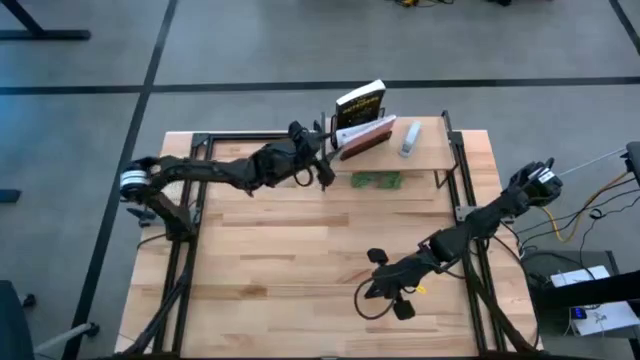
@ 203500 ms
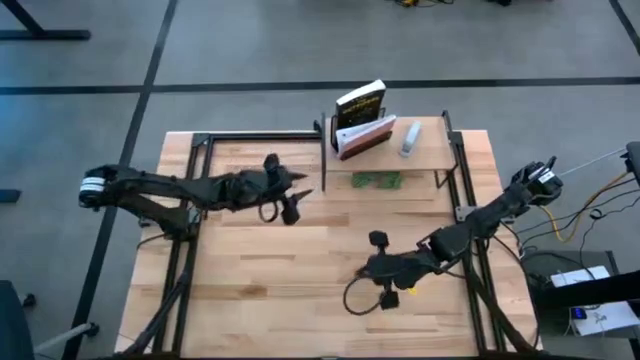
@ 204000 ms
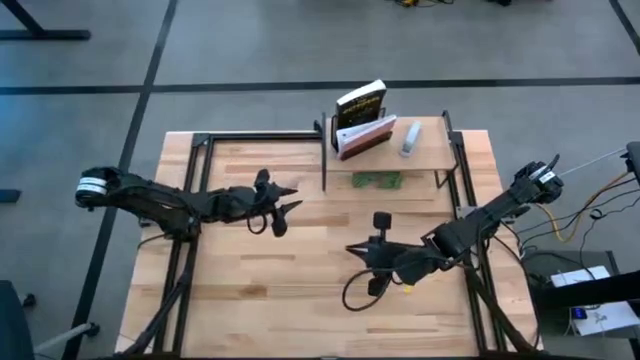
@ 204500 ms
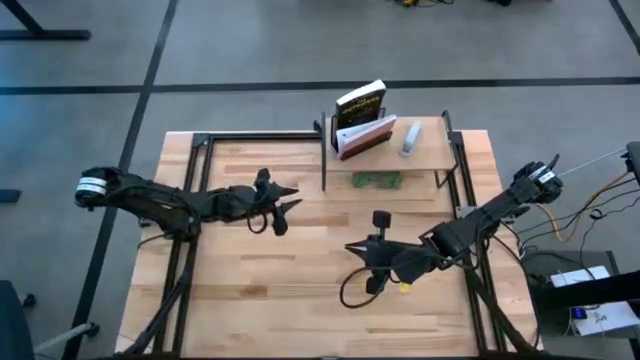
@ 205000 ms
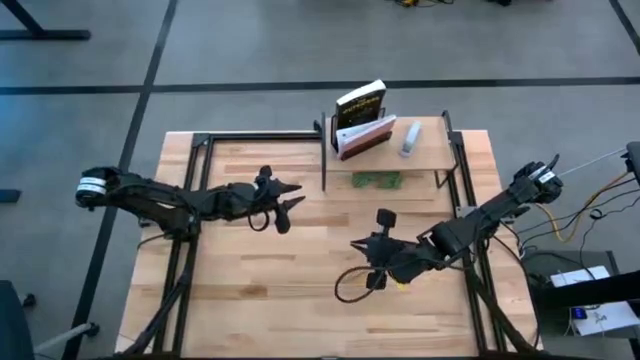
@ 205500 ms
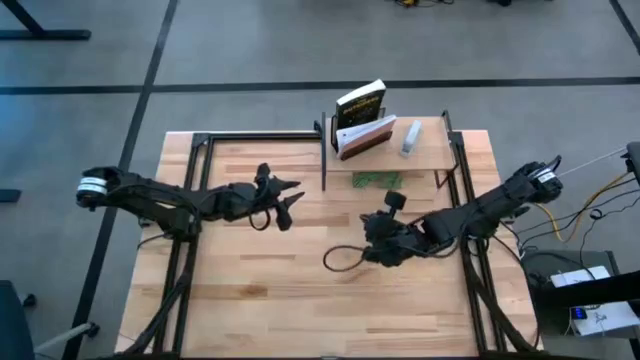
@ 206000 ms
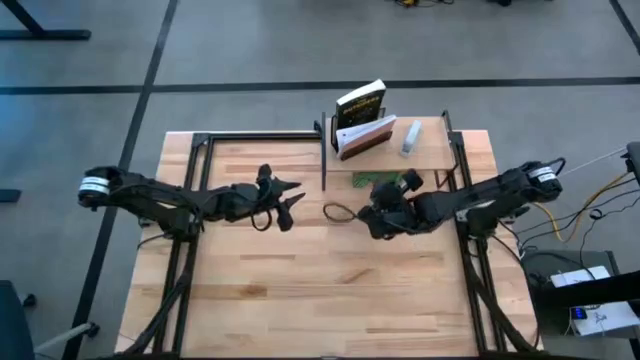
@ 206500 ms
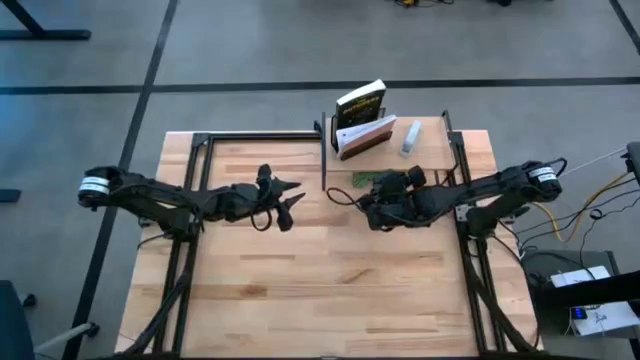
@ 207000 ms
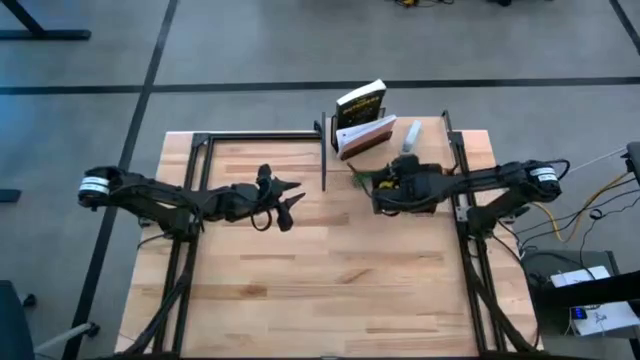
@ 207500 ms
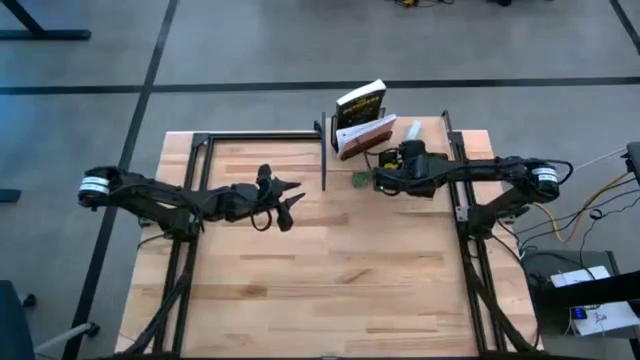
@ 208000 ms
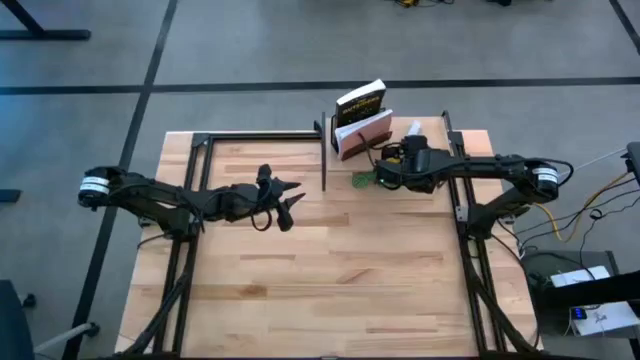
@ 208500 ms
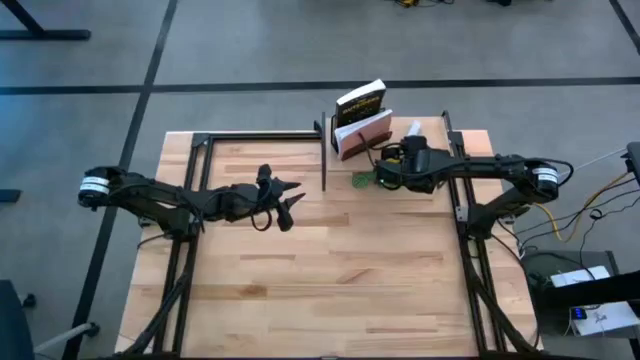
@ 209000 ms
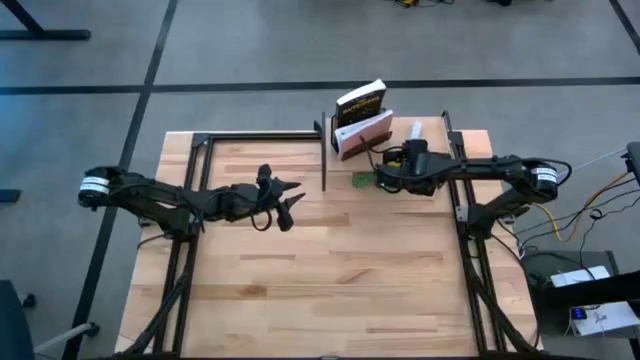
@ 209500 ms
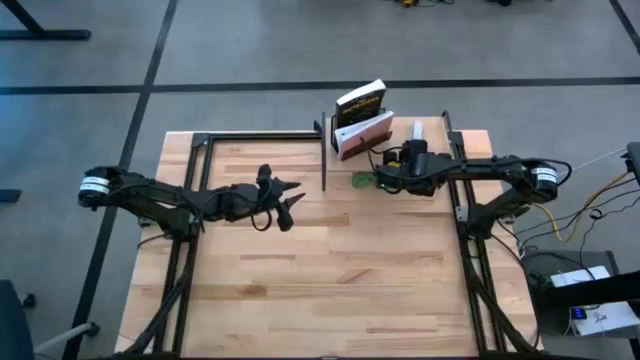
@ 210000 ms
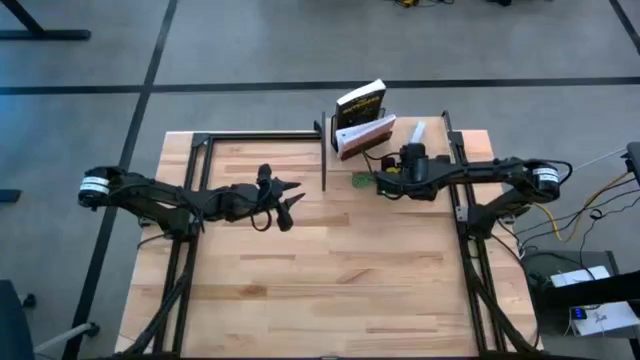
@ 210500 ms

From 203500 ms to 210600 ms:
Task: Stock shelves
Remove the gray stapler from the shelf

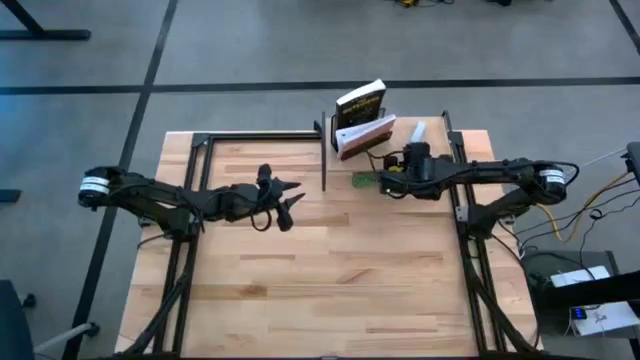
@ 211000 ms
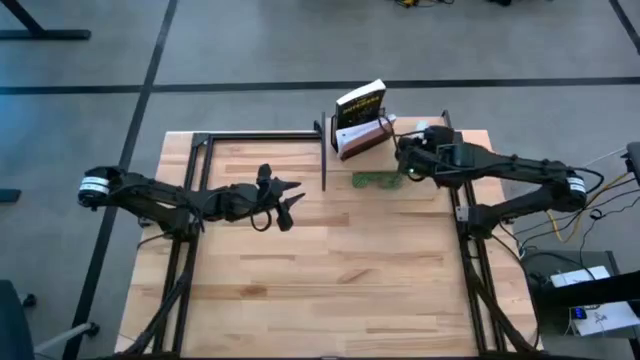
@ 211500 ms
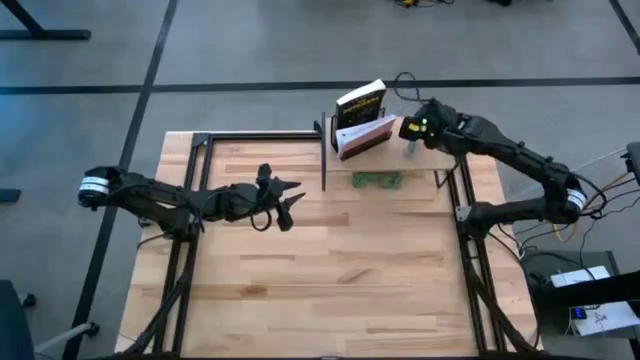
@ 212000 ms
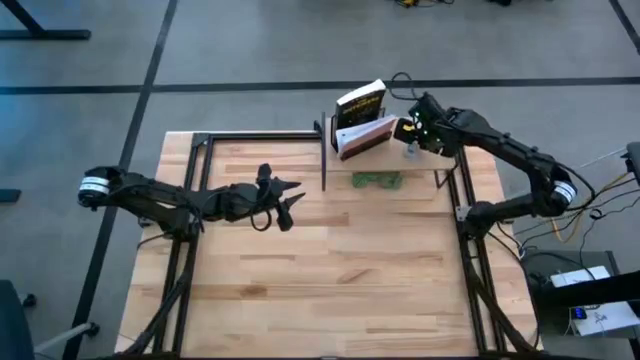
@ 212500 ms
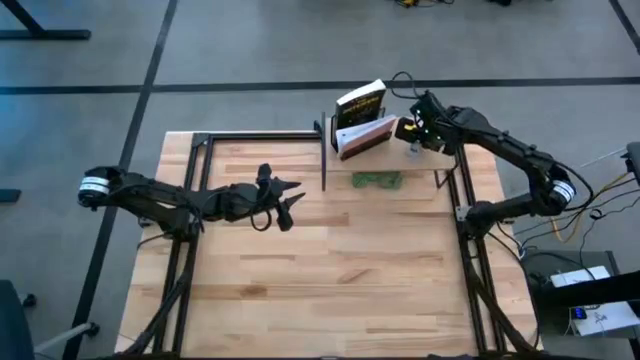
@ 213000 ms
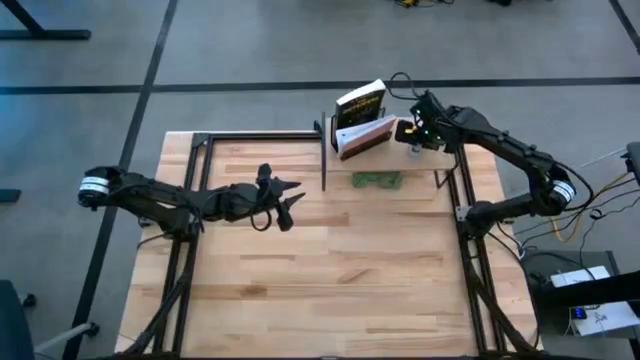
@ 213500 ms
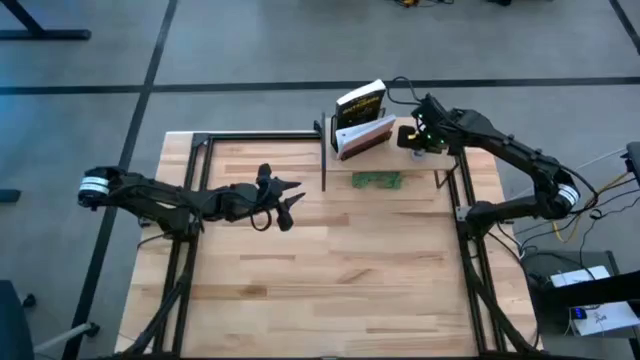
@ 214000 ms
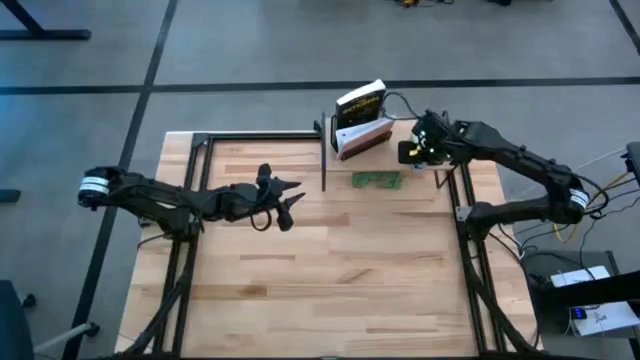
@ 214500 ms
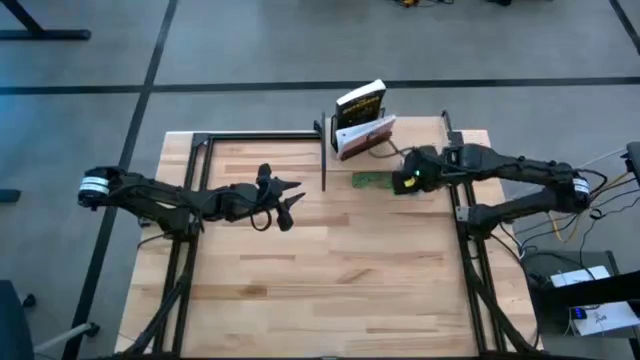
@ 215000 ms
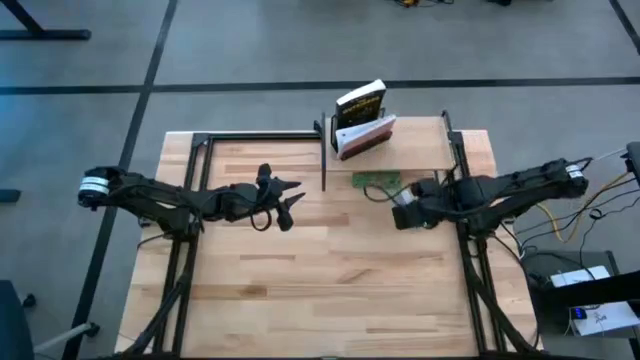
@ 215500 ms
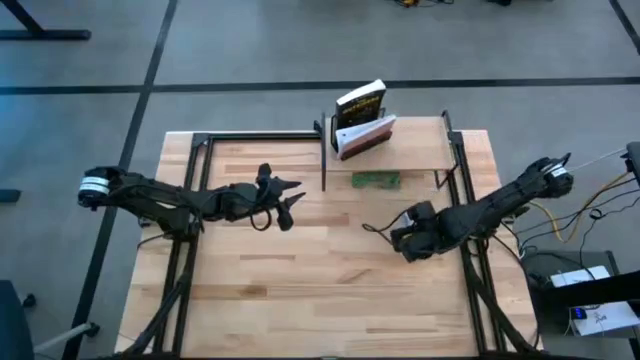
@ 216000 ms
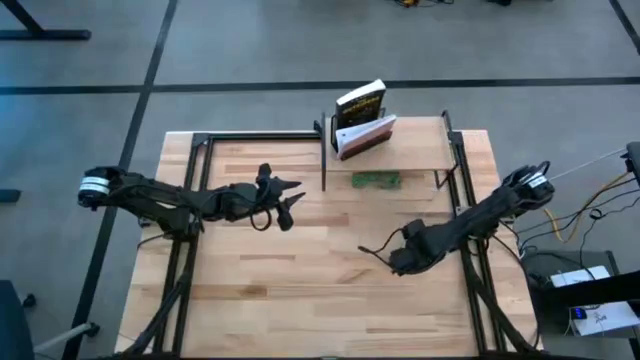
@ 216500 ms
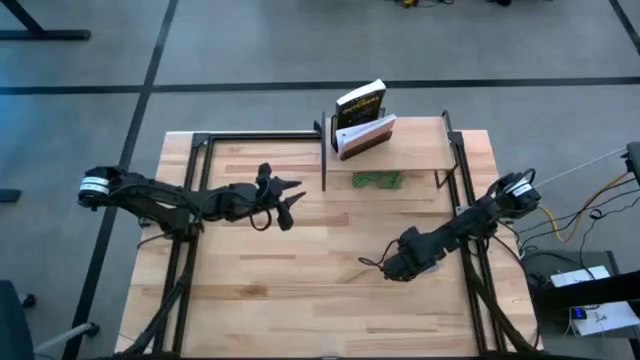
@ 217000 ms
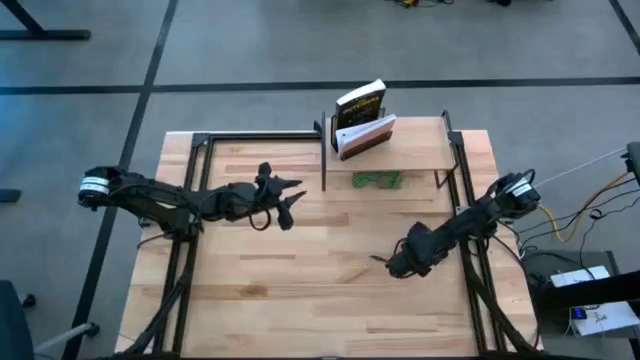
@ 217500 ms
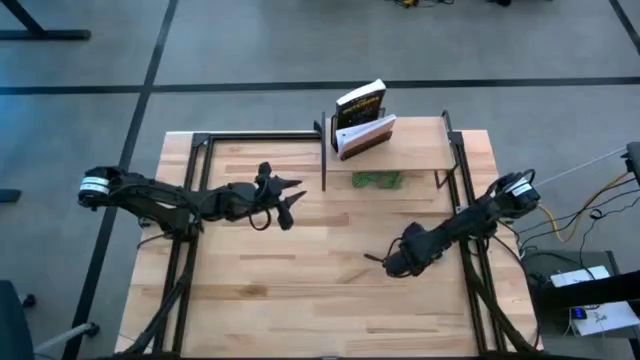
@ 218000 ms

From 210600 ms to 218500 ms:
Remove the gray stapler from the shelf

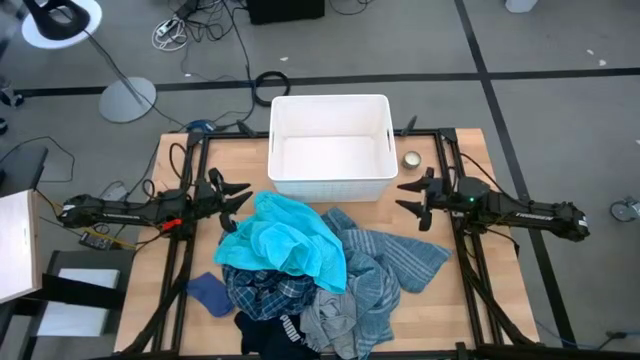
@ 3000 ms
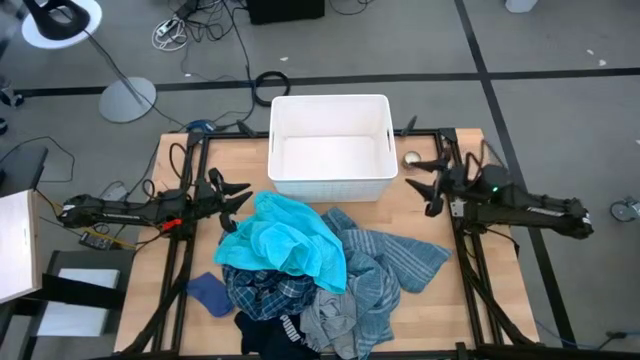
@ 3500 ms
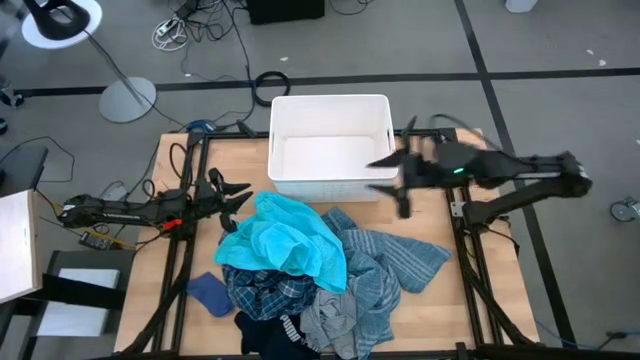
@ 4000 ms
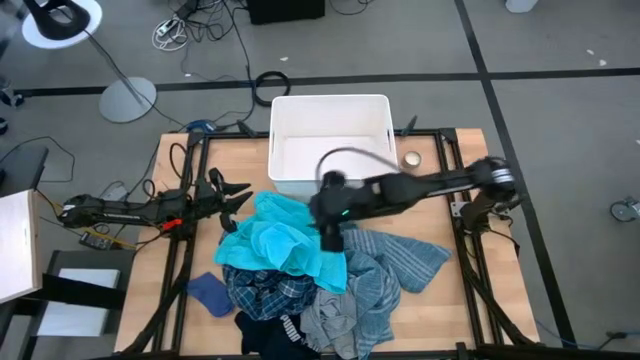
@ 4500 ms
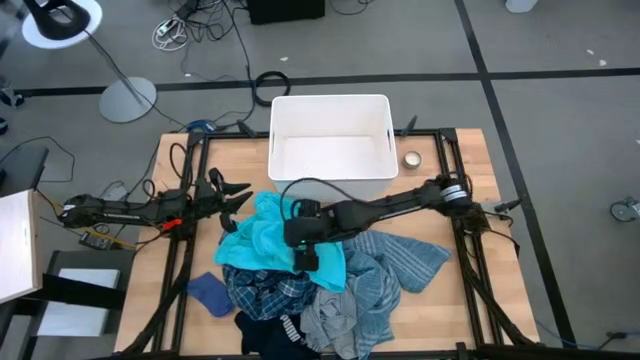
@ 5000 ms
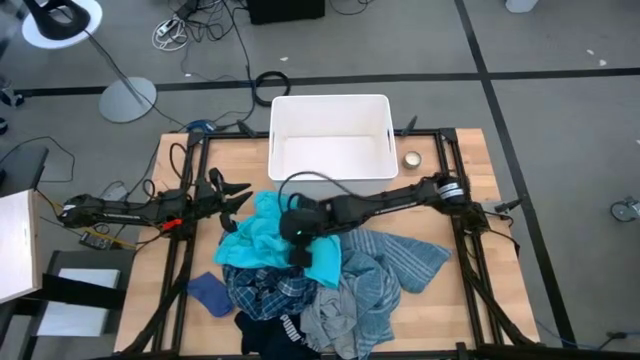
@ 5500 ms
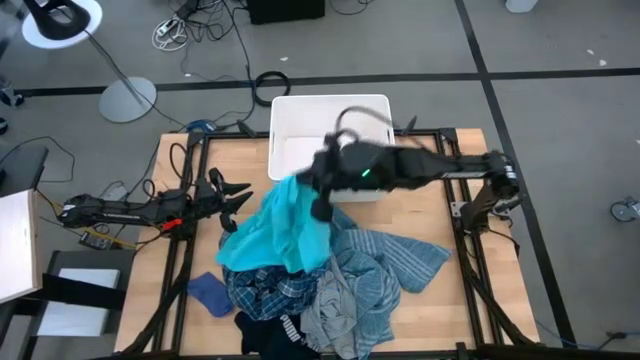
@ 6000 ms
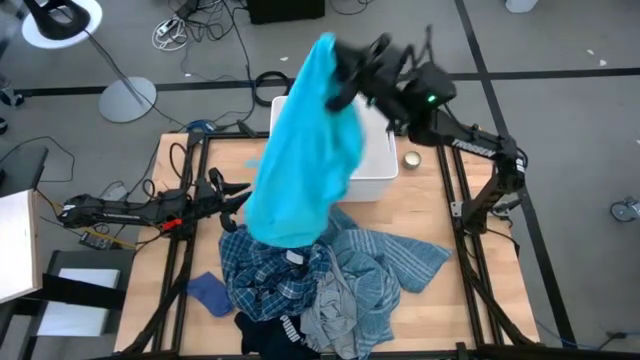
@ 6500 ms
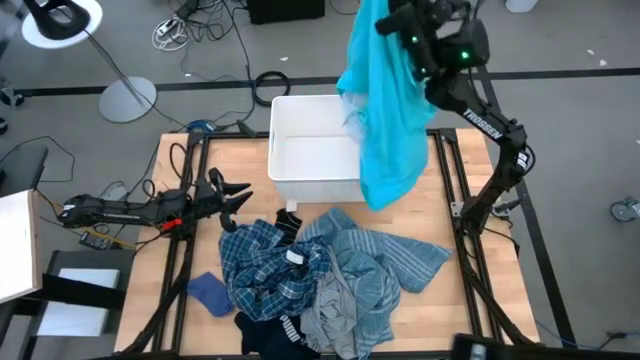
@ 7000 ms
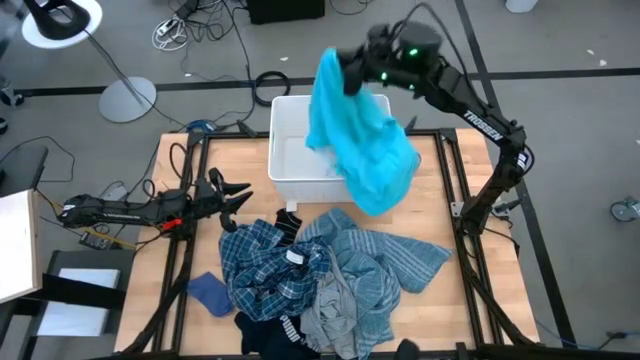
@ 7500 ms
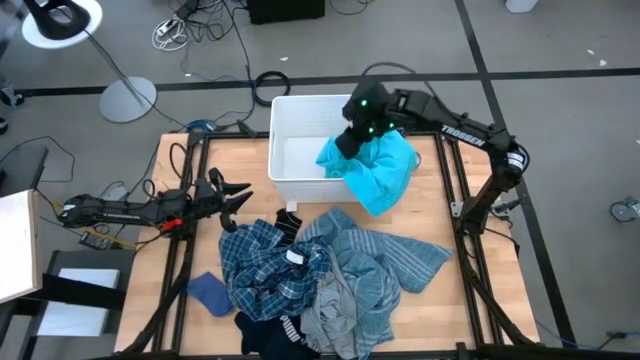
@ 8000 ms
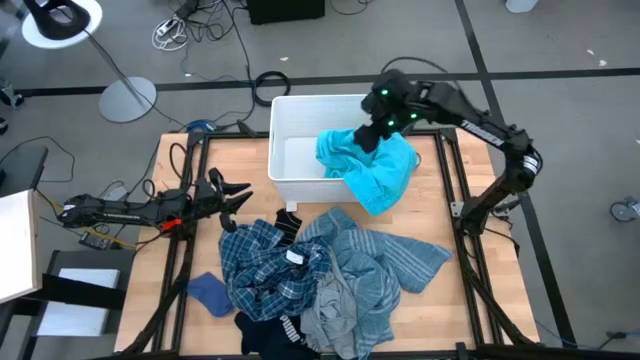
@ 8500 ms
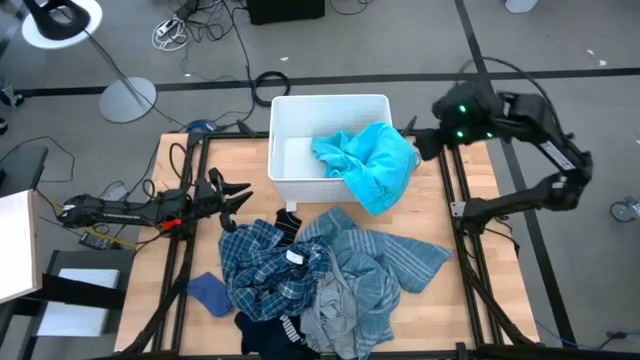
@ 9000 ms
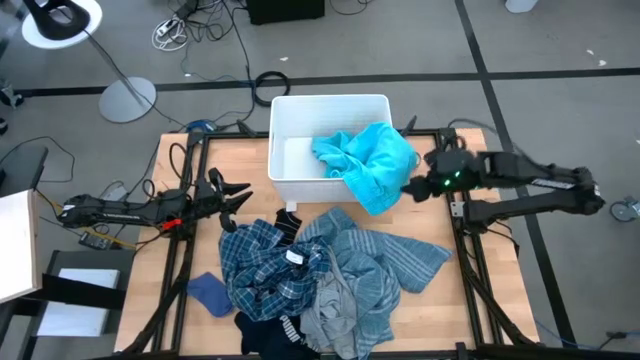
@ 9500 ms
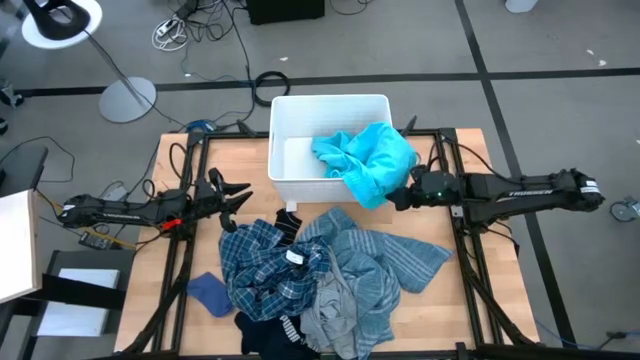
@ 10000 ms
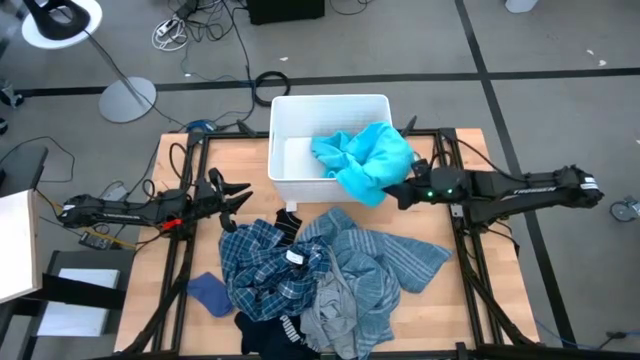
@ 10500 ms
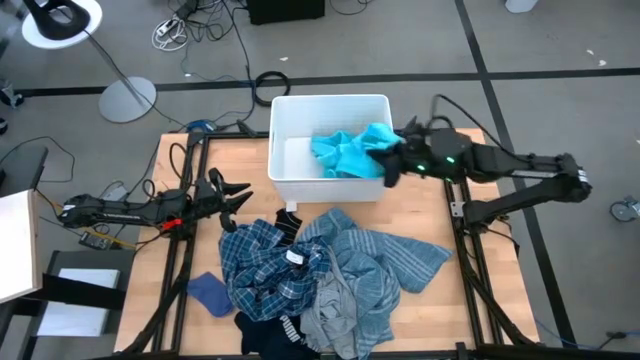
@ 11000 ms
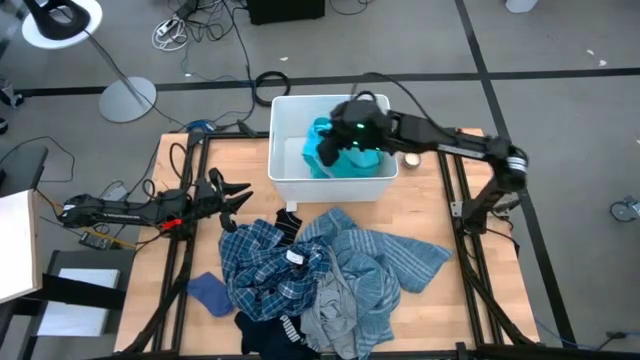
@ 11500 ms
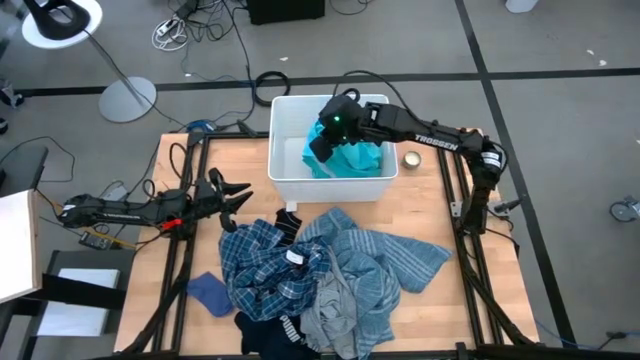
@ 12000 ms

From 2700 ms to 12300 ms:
Task: Sort clothes
Put the blue shorts into the laundry bin
